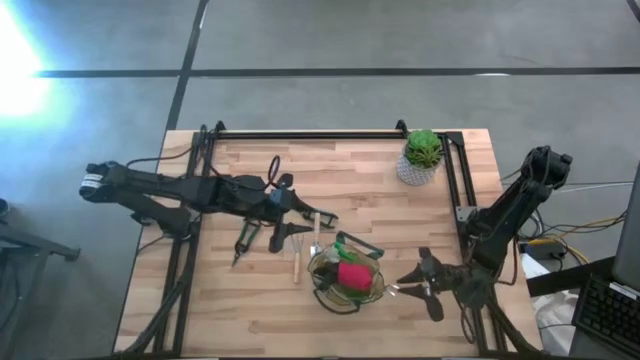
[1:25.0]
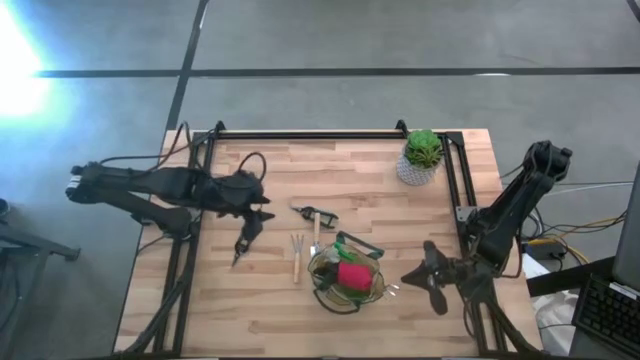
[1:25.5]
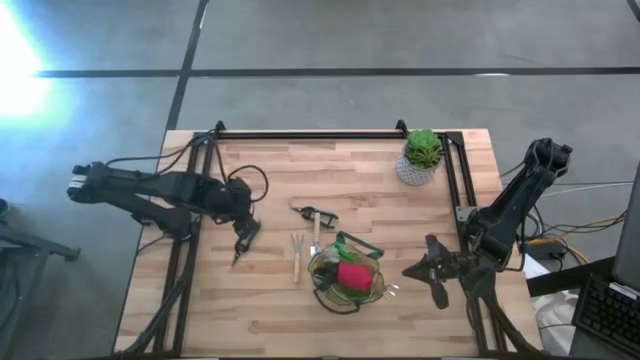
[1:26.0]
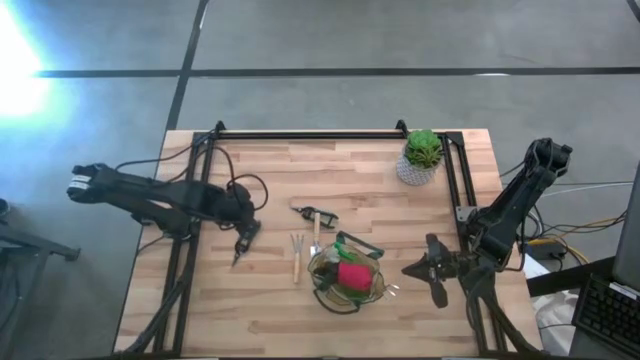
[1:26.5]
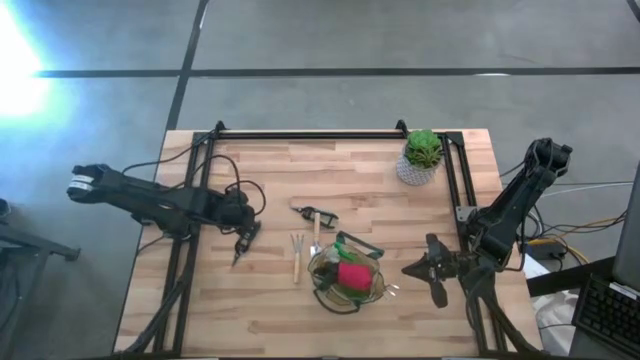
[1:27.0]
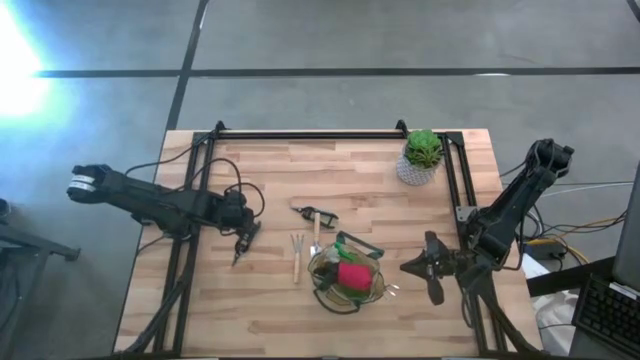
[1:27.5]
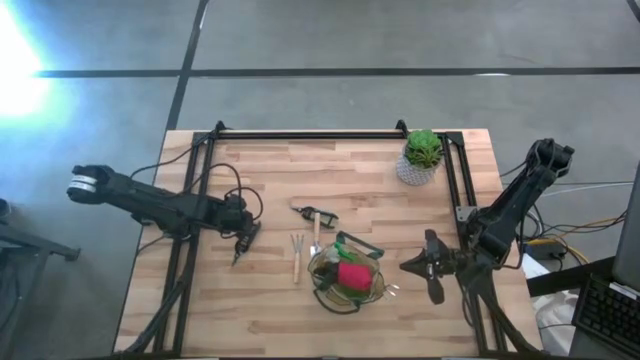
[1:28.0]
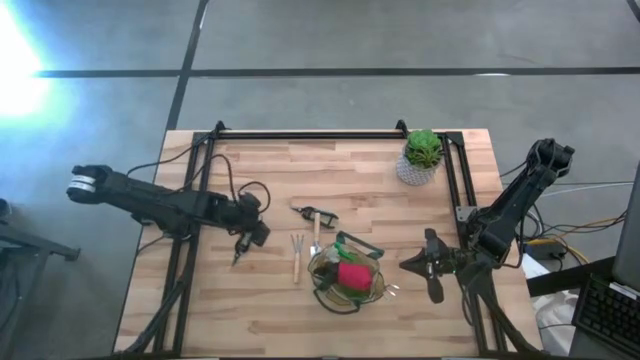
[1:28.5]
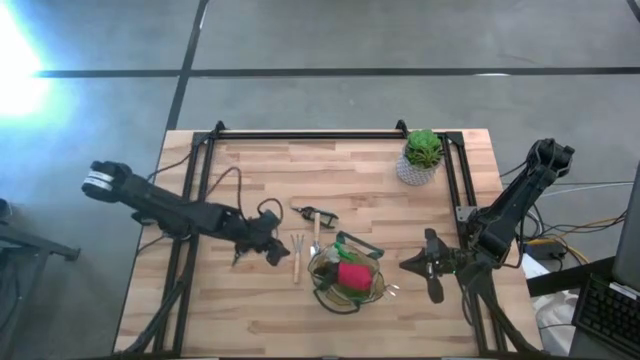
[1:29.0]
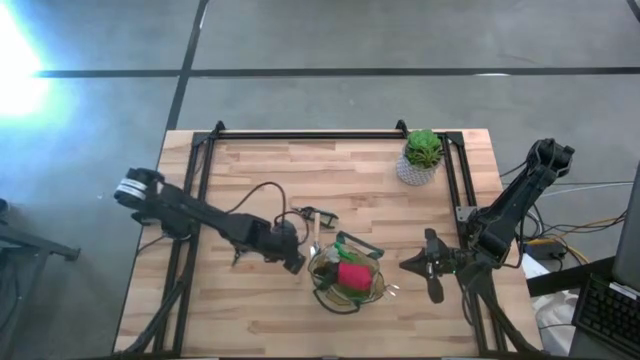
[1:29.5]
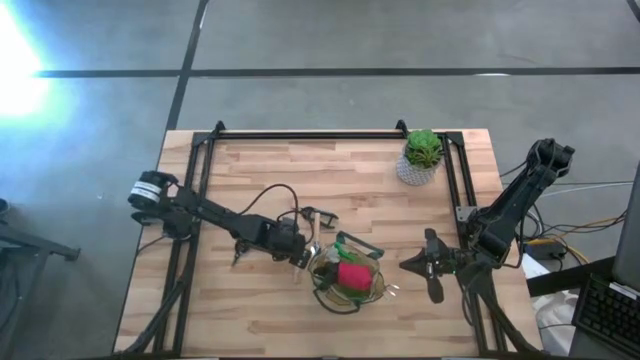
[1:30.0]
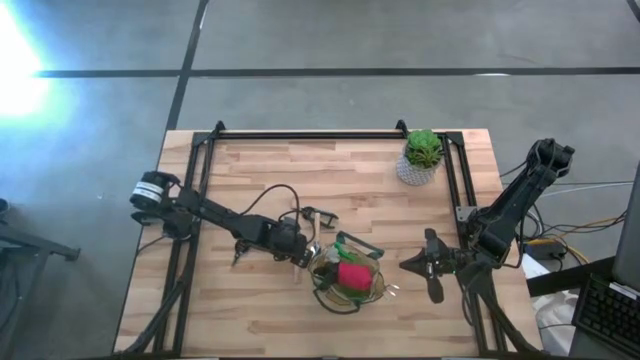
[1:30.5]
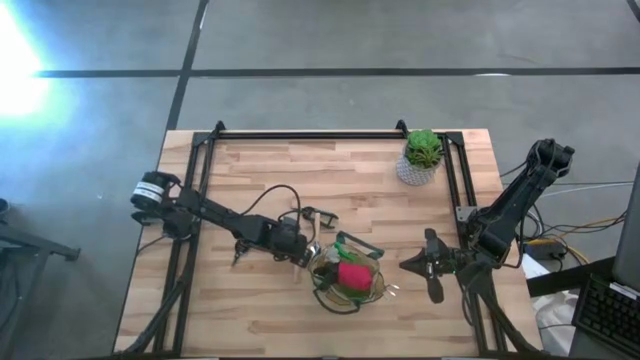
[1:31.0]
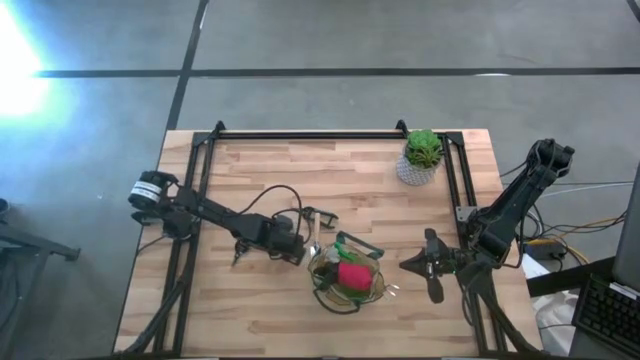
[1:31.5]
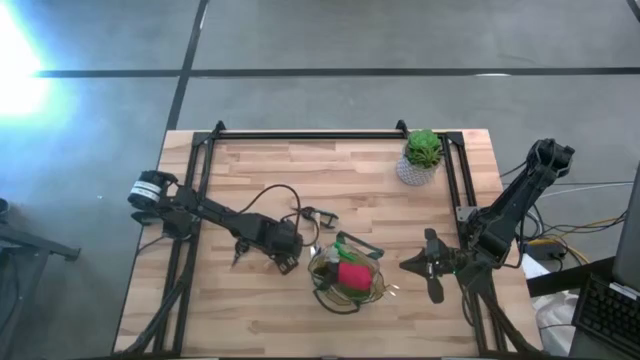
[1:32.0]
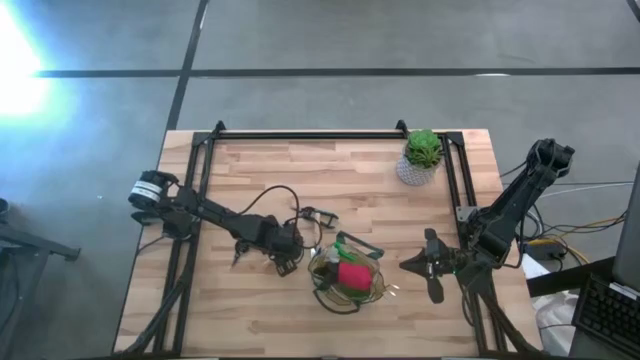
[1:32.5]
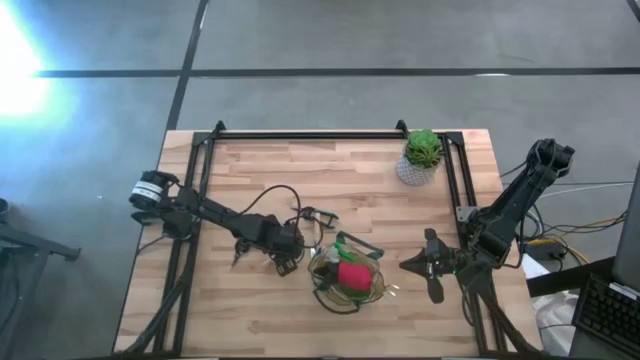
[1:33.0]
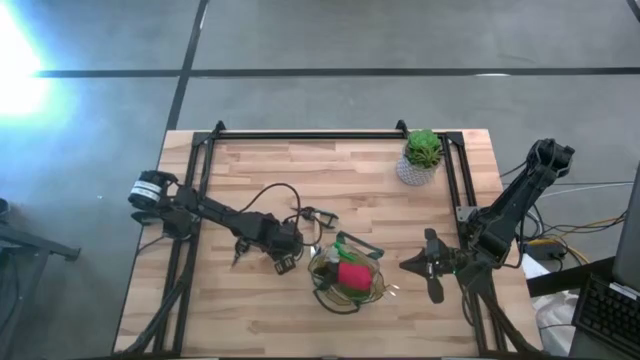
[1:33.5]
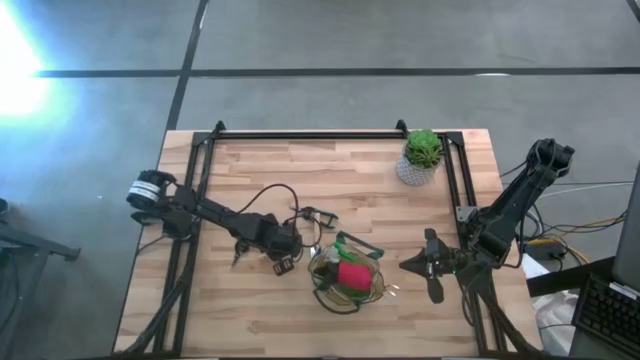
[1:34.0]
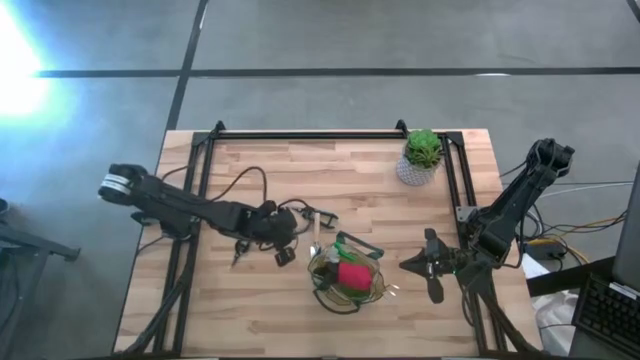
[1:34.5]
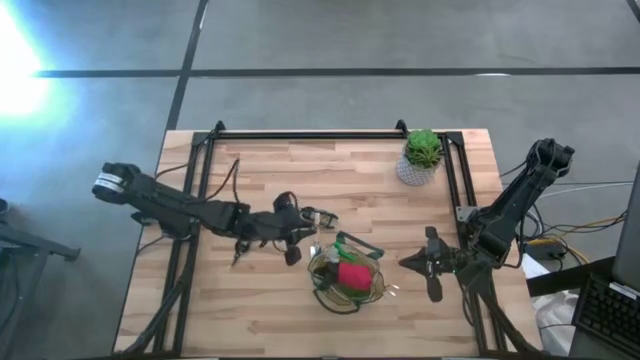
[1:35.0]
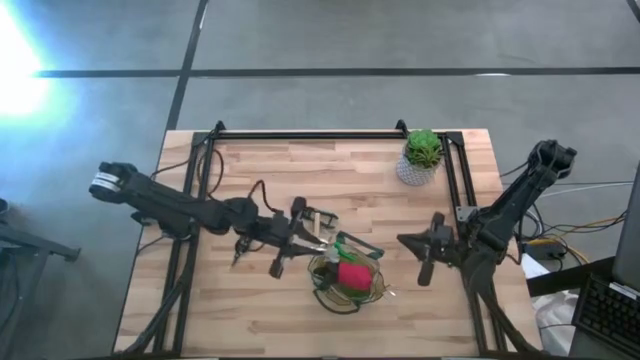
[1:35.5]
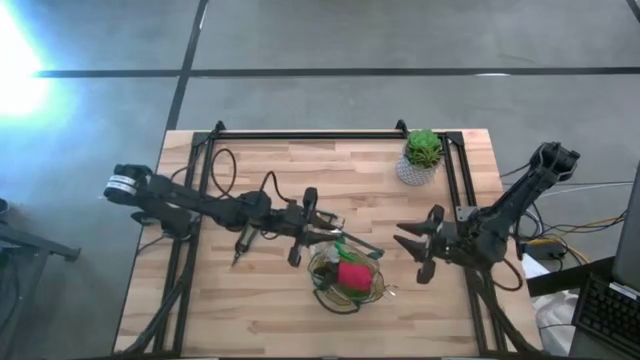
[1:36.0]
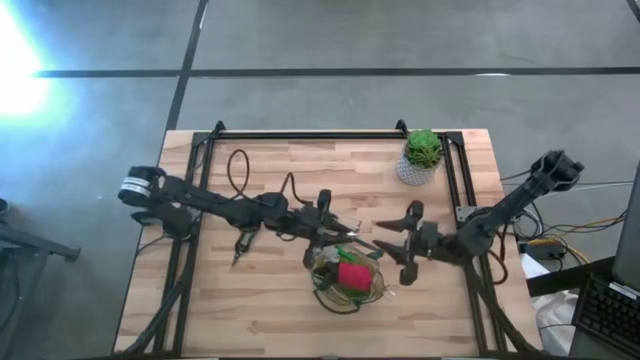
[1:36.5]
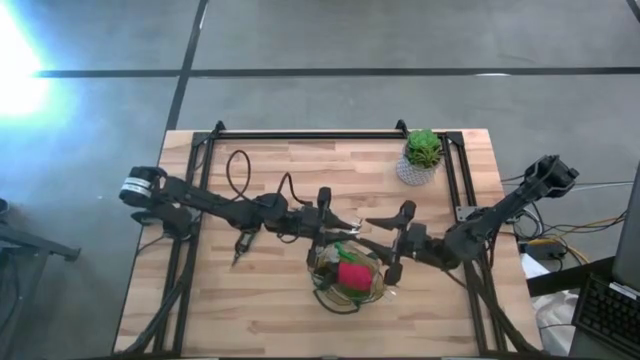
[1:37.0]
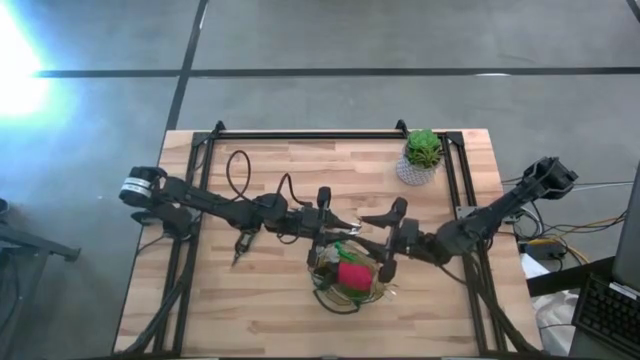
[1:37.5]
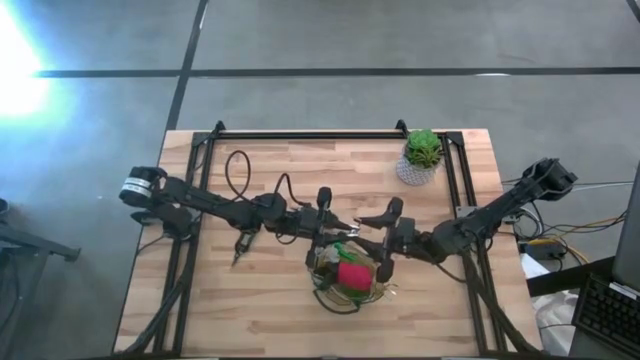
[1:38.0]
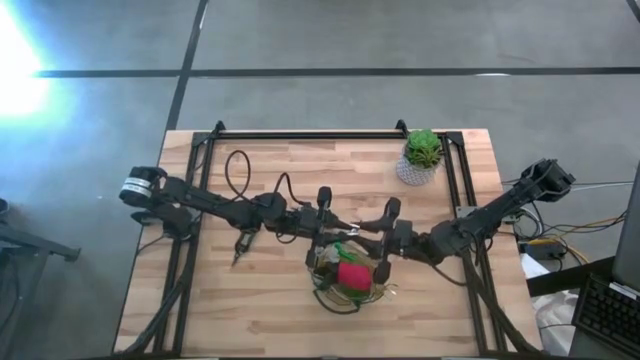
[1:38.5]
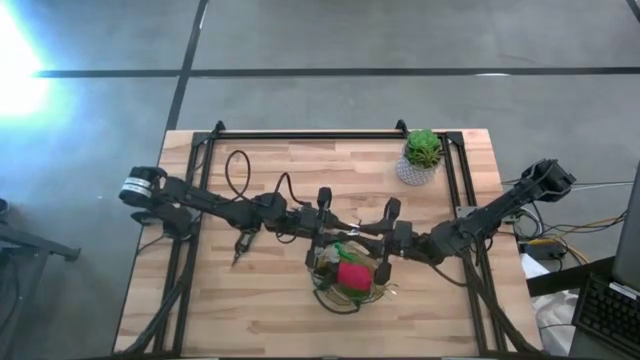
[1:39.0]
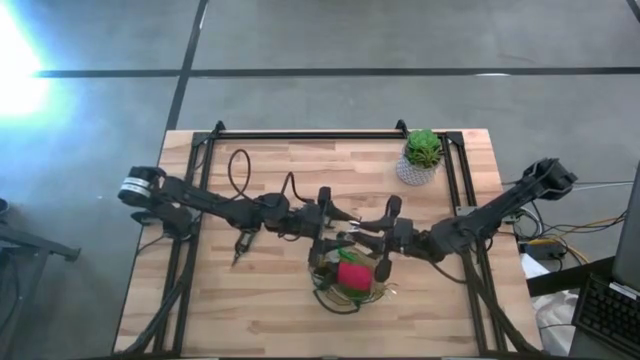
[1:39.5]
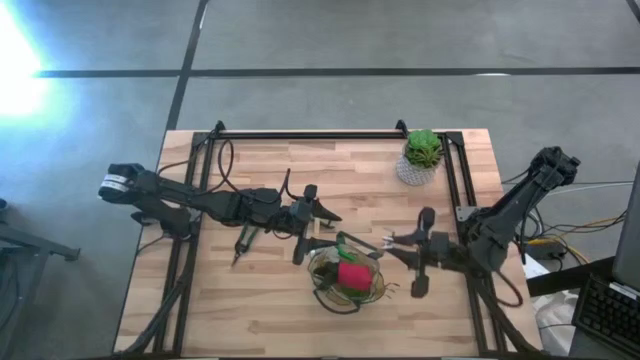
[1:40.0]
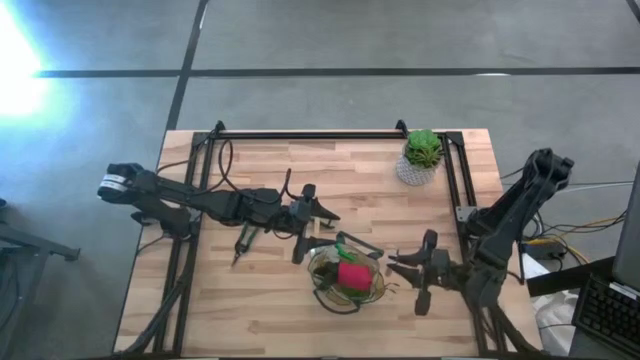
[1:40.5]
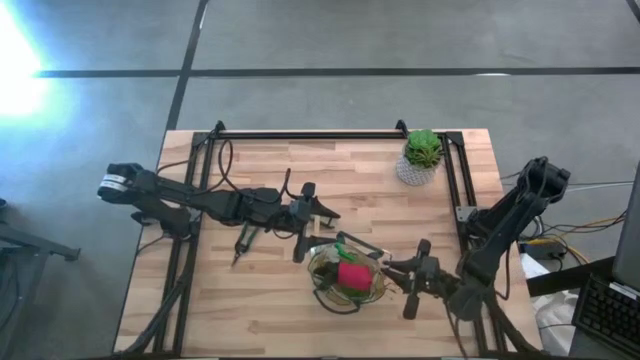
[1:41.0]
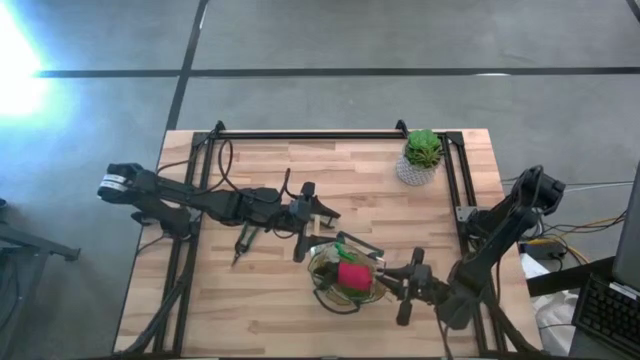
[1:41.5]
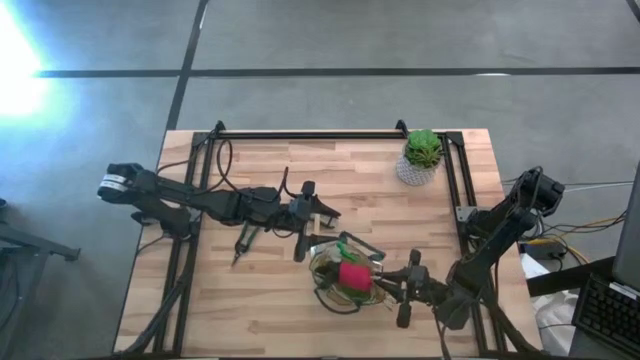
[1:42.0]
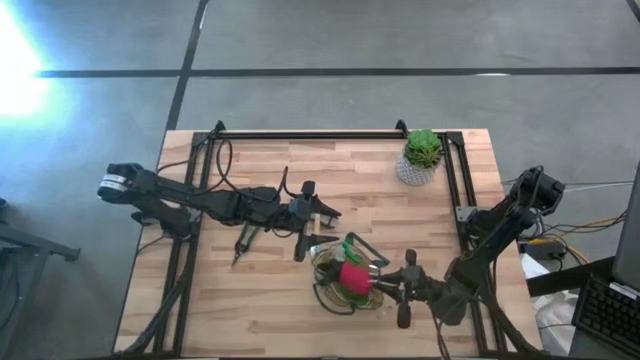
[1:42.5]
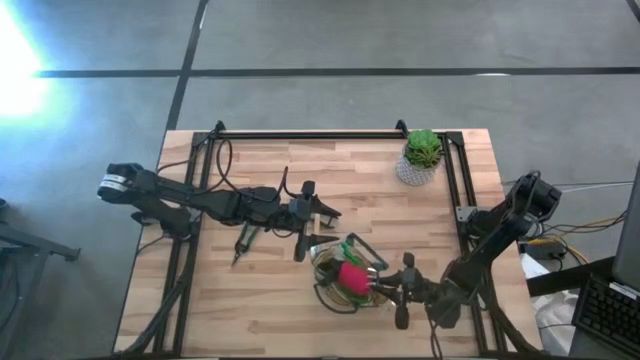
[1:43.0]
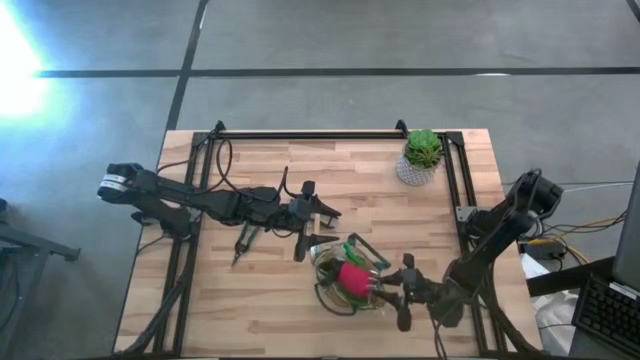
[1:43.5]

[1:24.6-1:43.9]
Task: Pick & Place Garden tools in Gardening bag
Put the brown hand rake into the white gardening bag

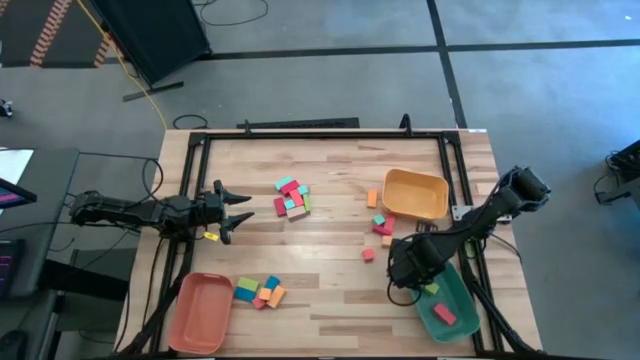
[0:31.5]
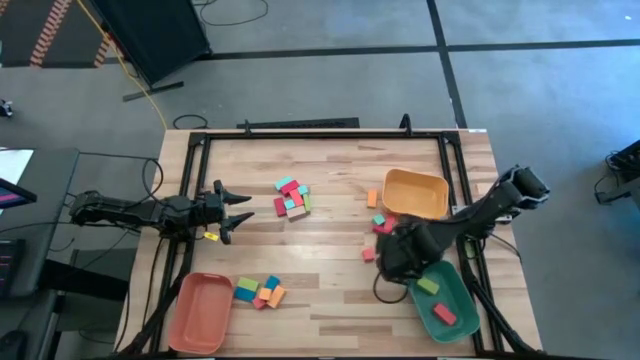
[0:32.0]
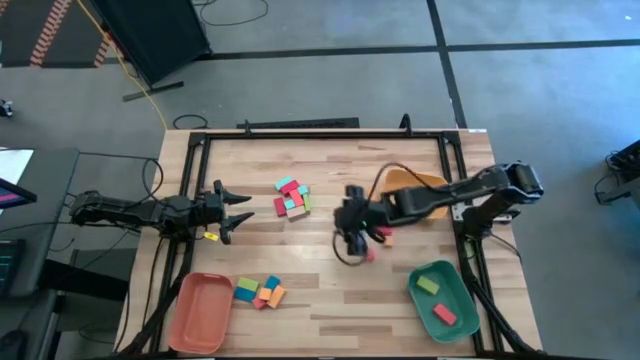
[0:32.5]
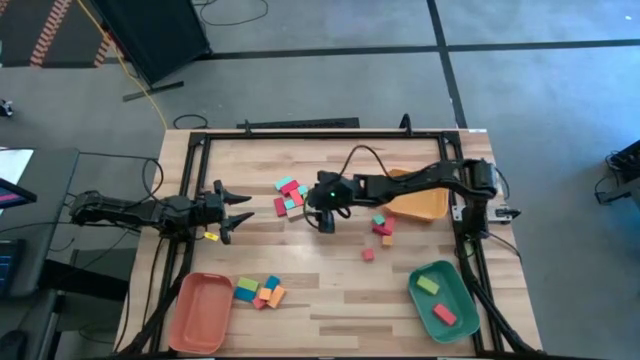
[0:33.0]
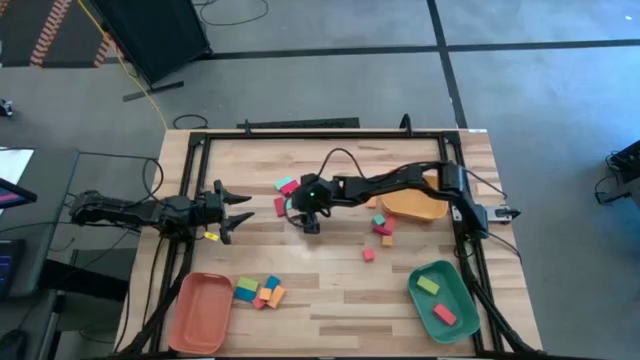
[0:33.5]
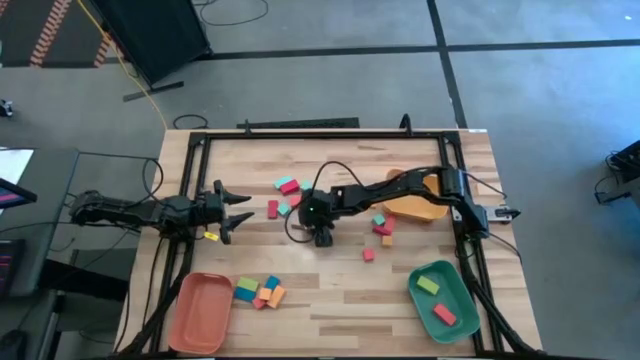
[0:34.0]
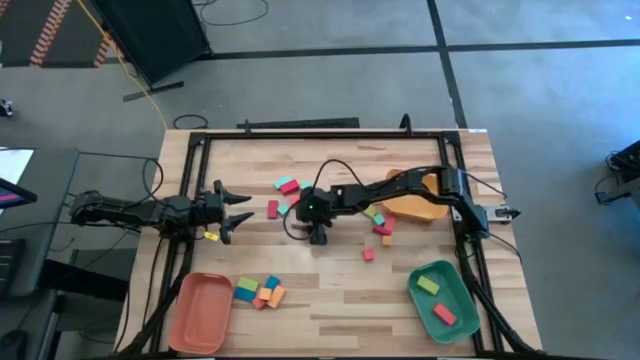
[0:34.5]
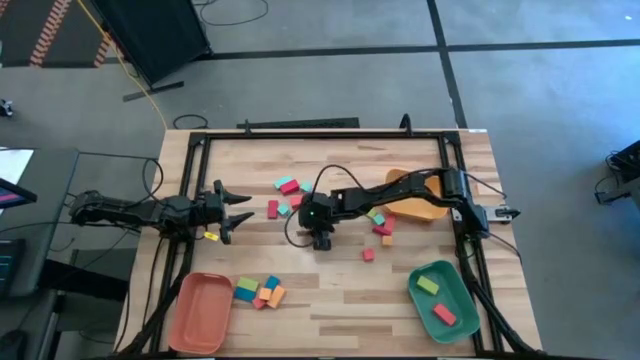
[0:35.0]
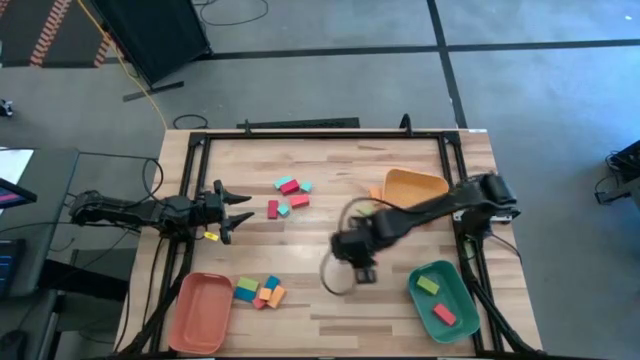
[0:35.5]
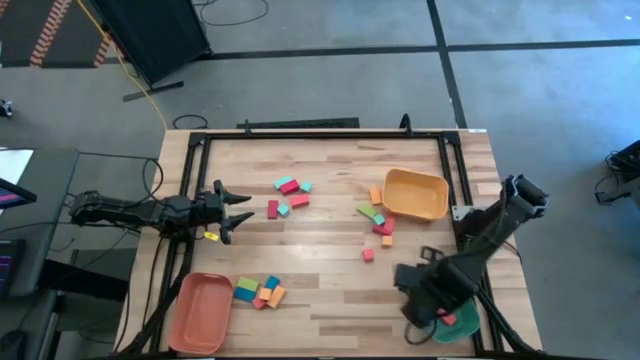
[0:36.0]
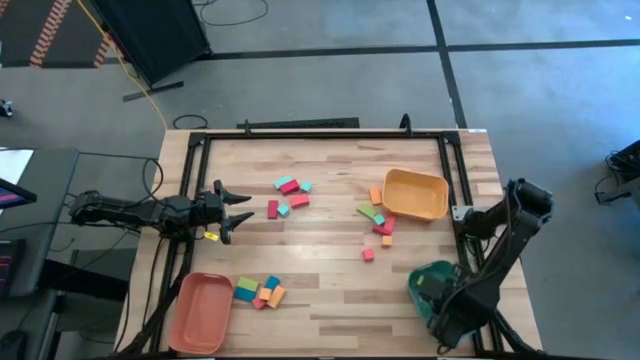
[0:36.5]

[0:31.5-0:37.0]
Task: Sort blocks by size
Put the large brown block into the green bin
